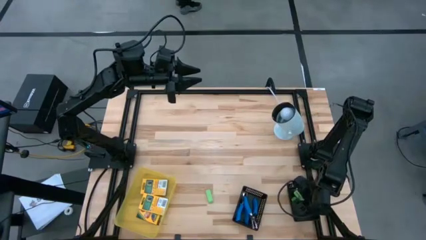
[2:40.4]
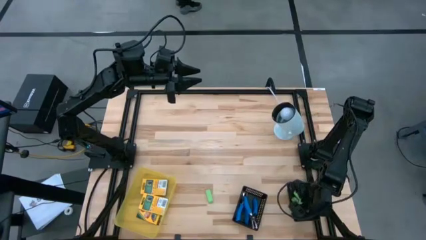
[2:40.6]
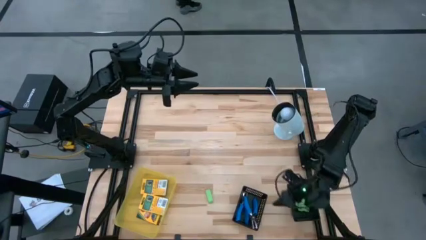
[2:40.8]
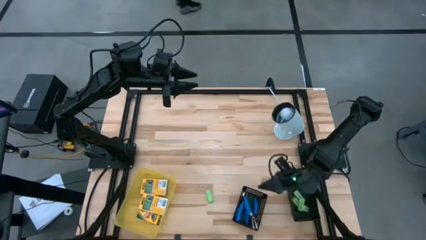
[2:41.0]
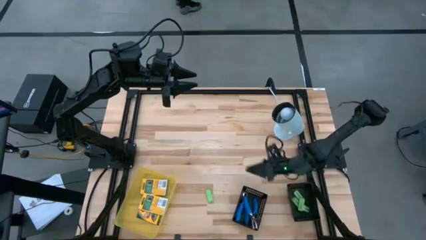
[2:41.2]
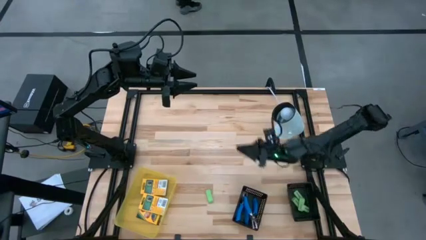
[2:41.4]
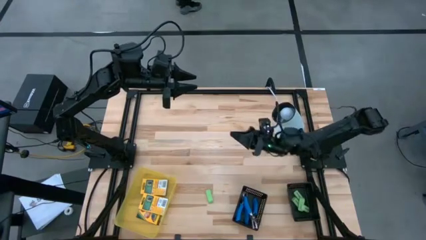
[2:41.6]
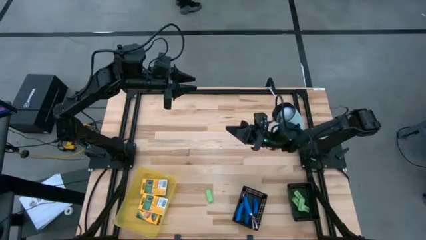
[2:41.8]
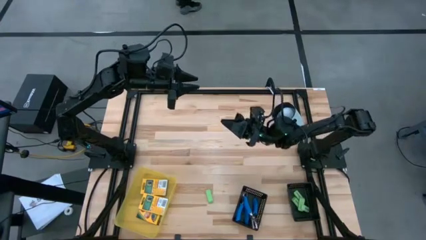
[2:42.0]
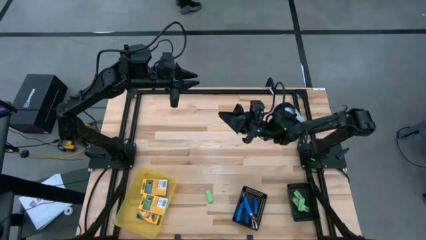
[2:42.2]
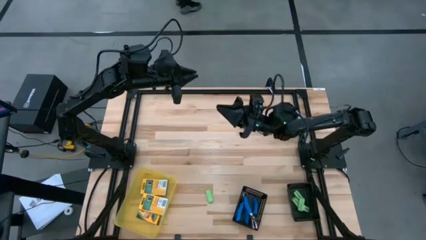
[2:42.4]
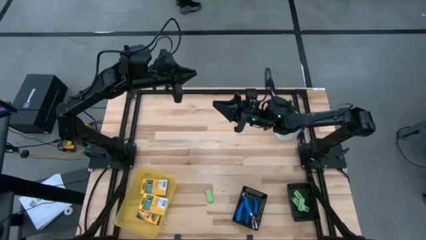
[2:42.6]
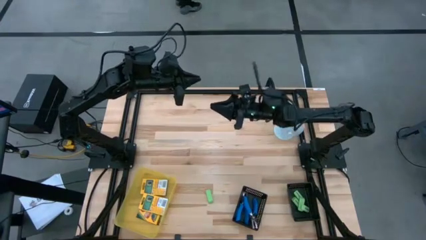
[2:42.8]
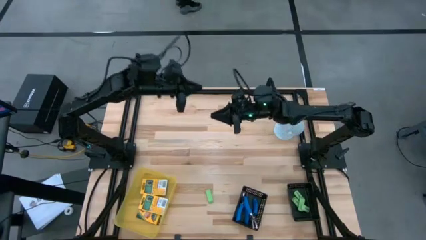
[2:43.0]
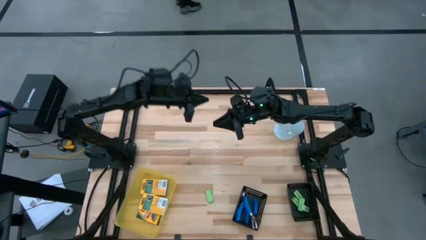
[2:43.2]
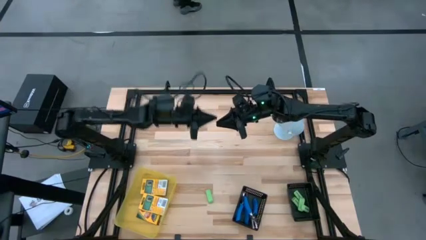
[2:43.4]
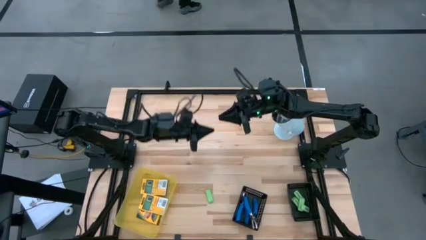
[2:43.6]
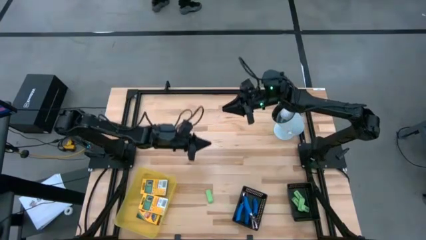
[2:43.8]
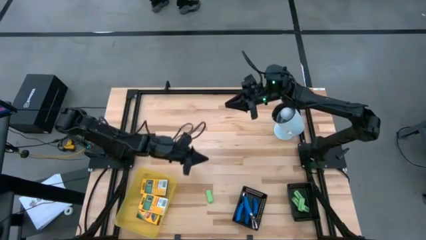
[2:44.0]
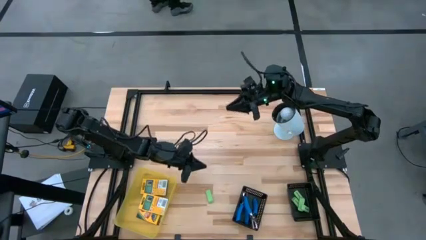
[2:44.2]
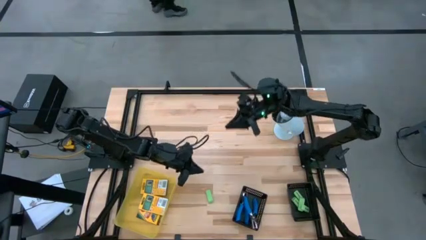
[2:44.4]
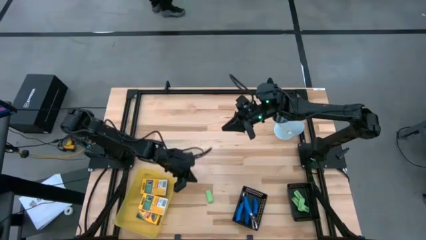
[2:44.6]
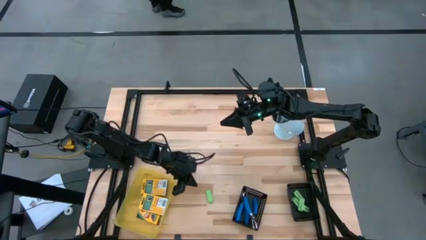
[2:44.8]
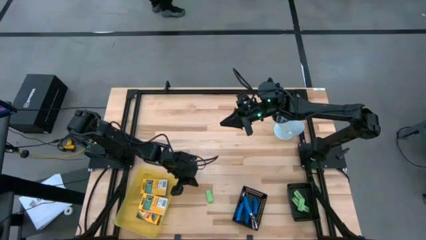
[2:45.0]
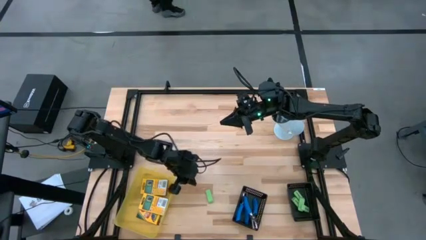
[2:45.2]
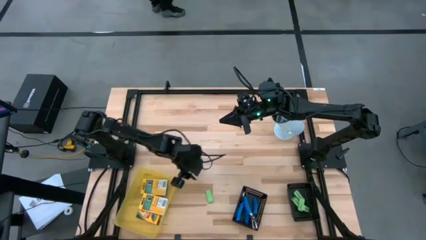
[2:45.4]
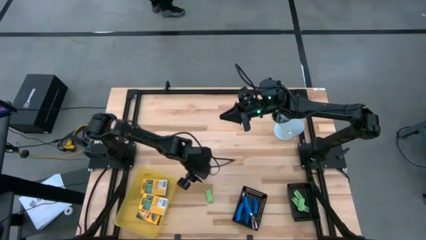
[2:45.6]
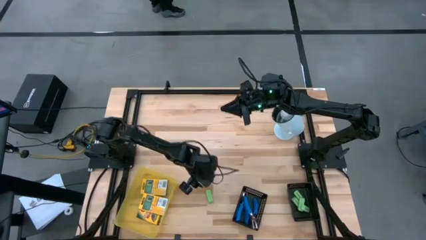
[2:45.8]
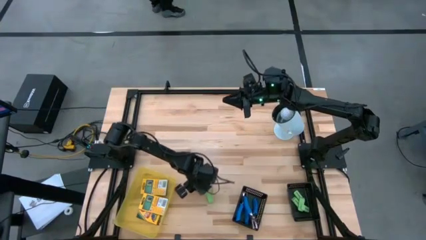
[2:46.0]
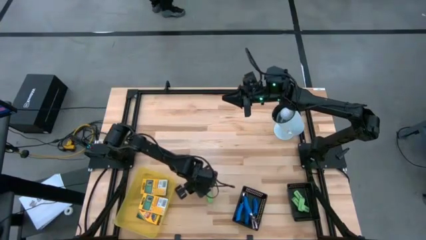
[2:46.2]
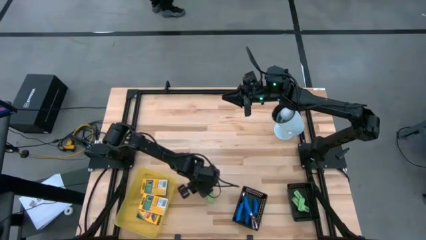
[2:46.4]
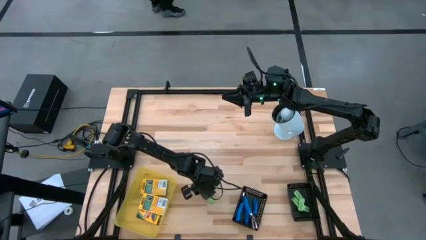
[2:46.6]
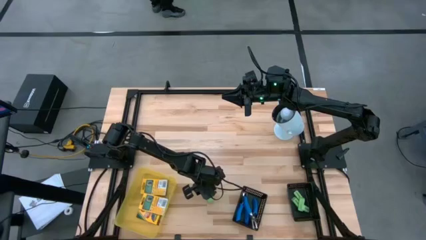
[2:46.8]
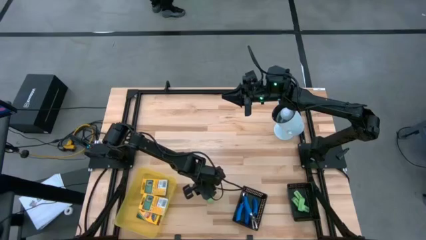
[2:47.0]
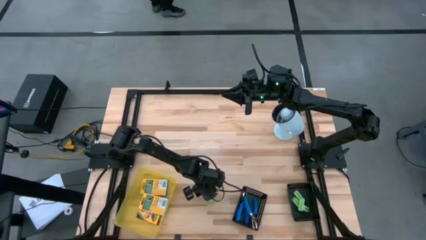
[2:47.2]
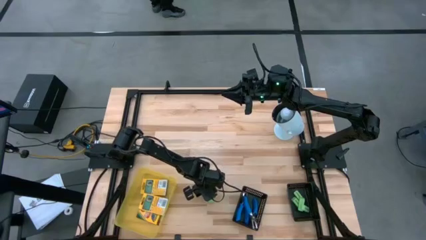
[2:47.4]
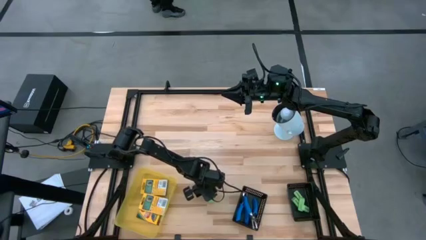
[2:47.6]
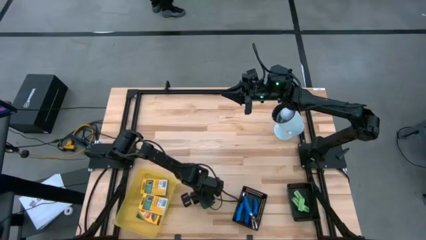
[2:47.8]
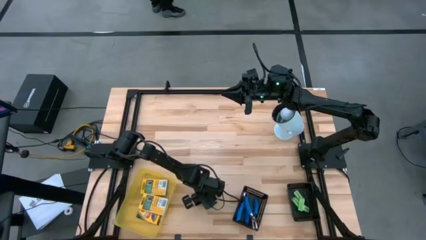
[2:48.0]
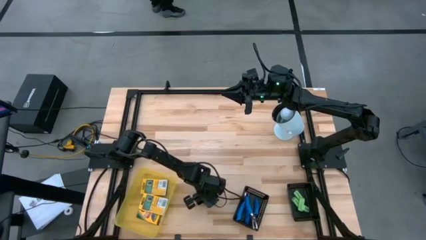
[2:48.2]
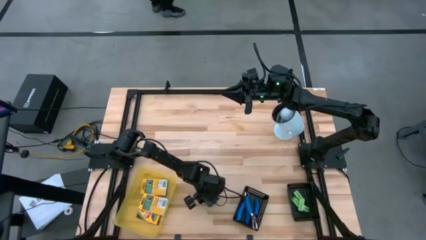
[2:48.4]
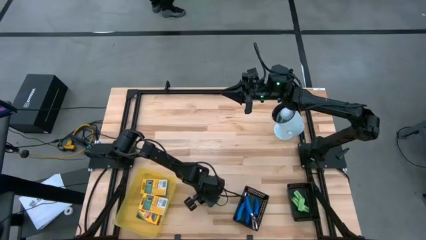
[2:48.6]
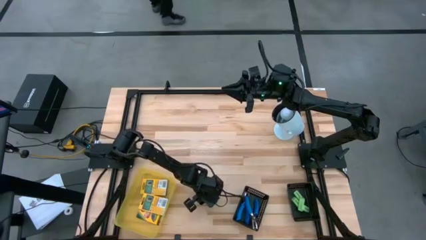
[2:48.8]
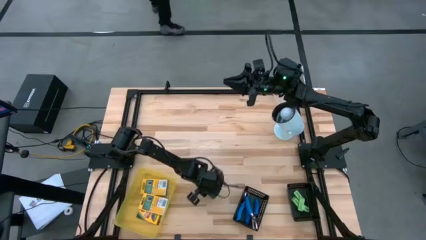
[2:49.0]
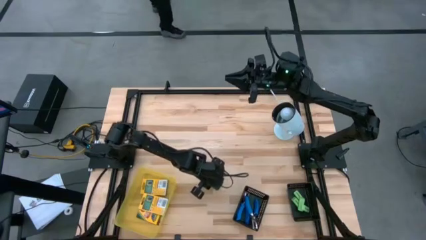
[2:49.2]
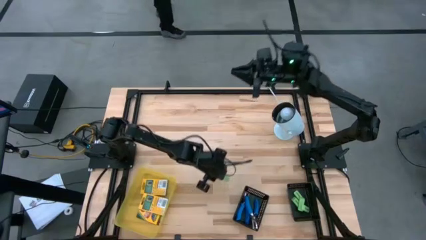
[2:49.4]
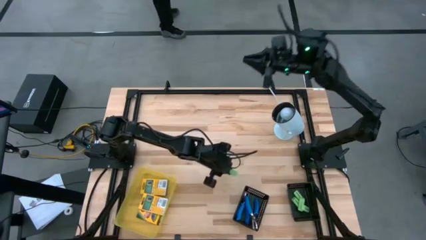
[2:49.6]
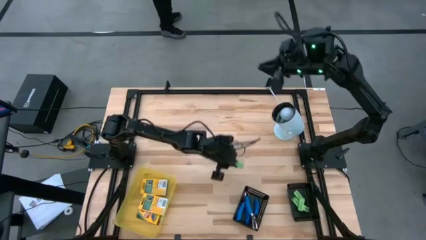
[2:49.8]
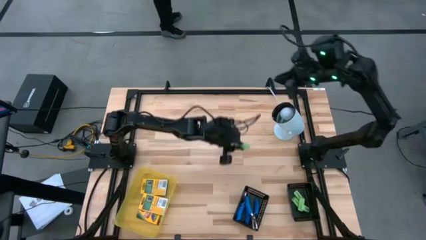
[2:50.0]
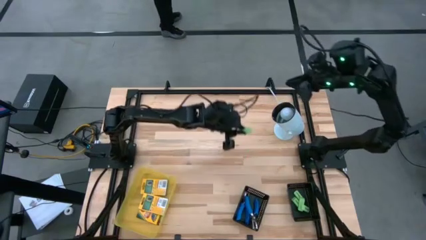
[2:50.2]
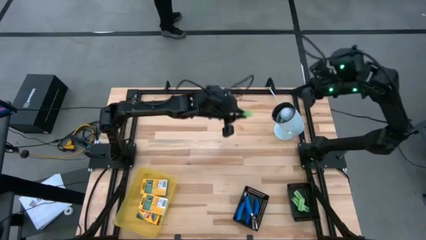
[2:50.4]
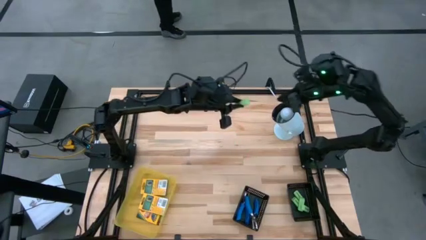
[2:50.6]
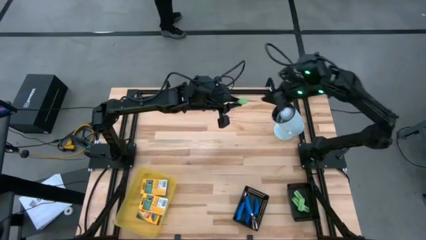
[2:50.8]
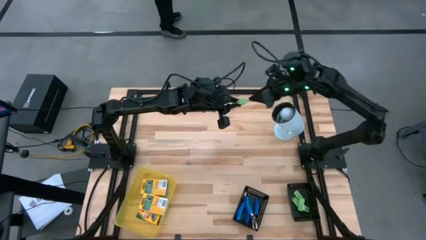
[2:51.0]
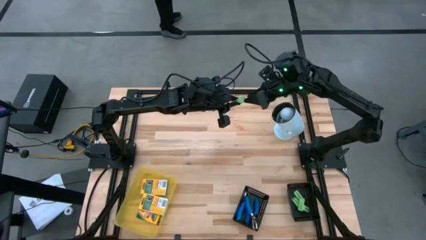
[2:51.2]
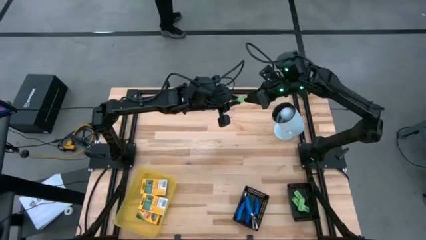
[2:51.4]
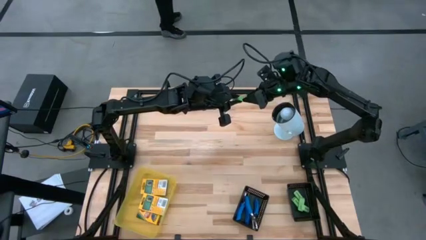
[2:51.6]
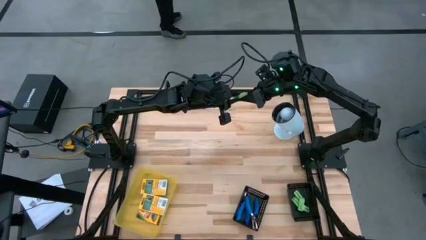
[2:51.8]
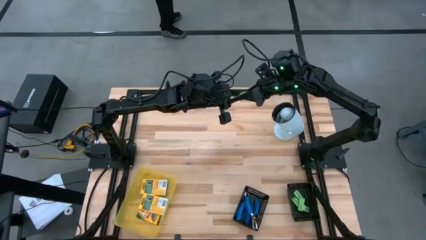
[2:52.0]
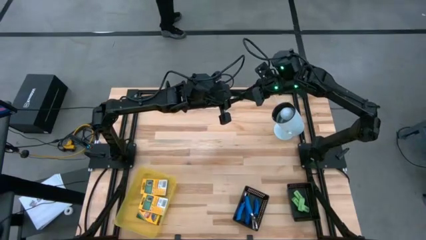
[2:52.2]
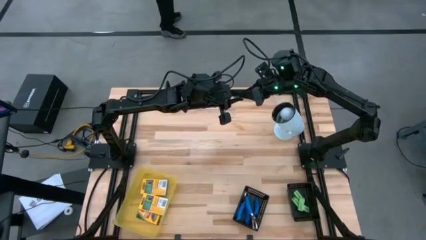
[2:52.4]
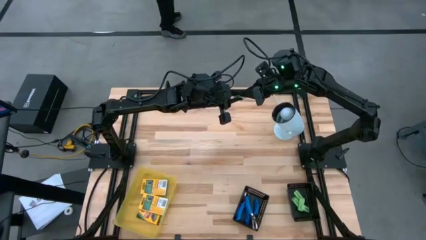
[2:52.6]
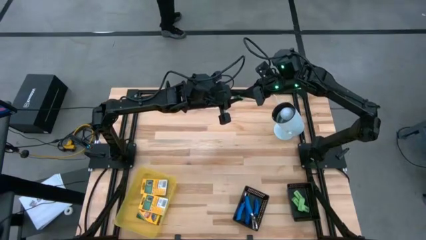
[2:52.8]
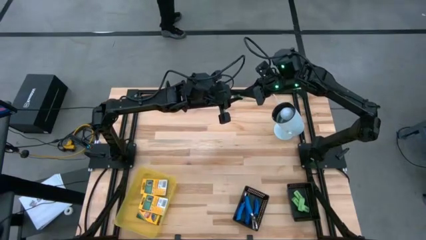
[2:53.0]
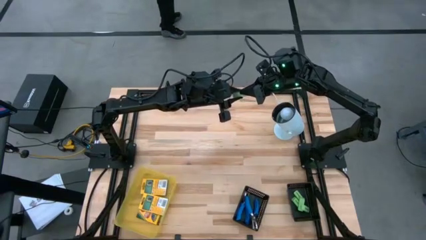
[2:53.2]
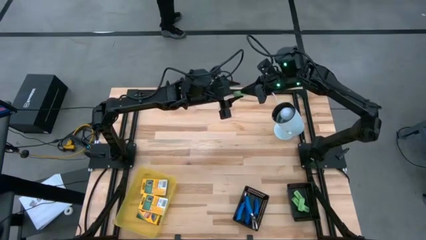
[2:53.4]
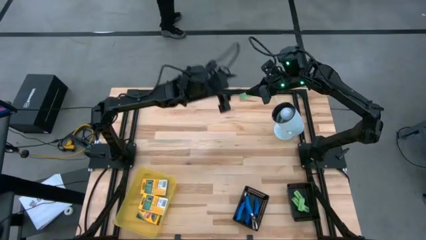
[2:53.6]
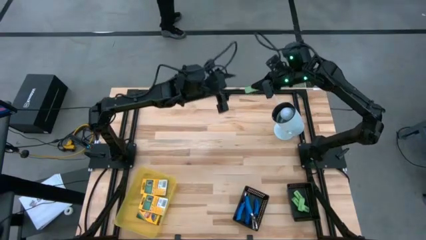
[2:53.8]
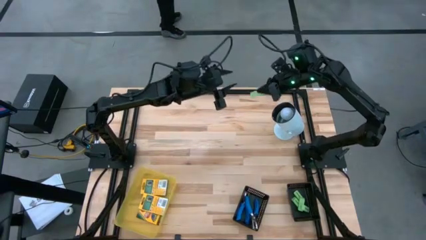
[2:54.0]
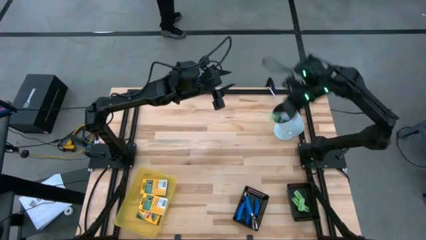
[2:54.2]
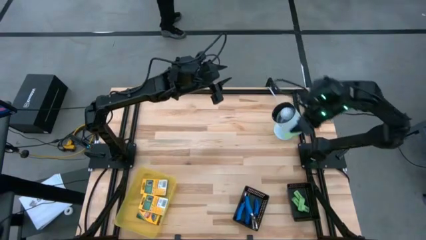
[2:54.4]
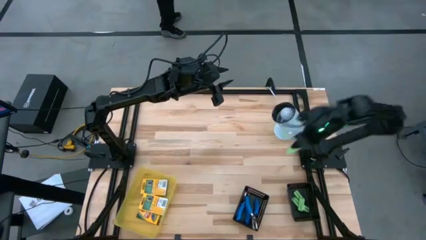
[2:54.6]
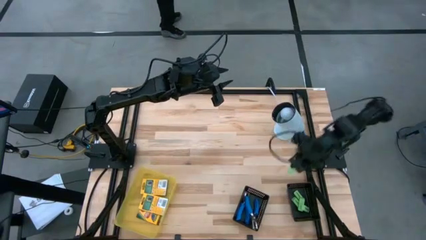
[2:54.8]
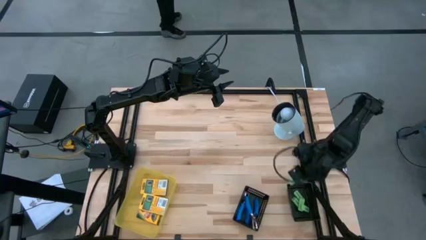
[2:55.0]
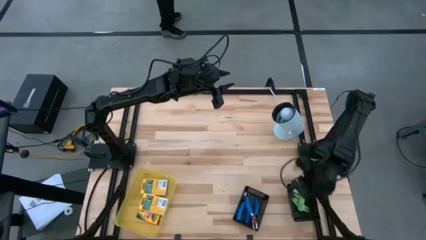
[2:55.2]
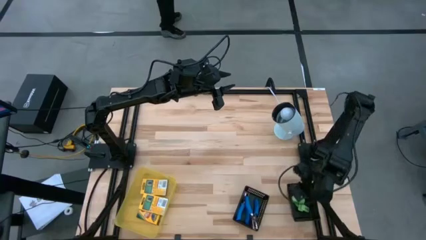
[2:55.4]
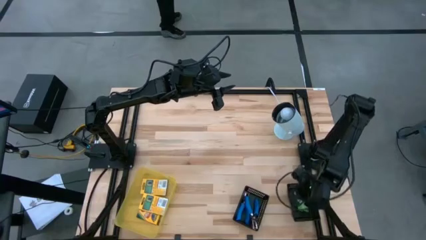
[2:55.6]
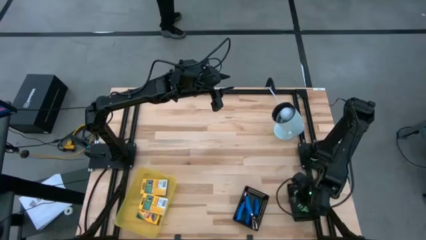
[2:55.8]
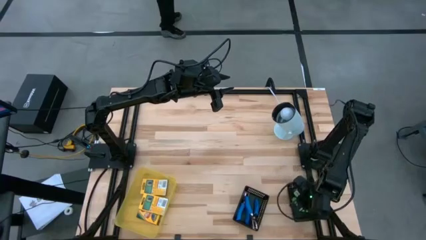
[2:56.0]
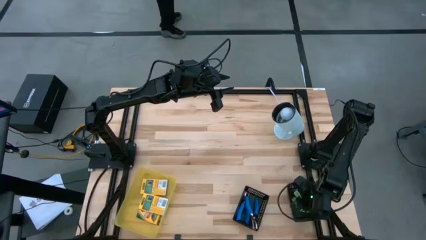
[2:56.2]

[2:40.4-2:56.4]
Task: Pick & Place School Supplies
Put the green eraser into the right black bin

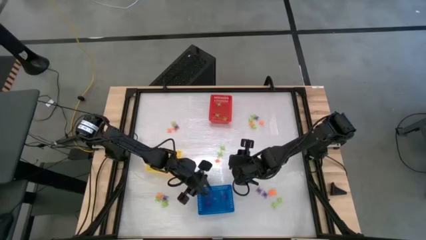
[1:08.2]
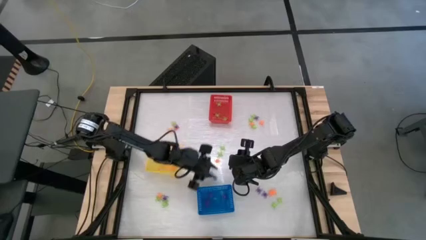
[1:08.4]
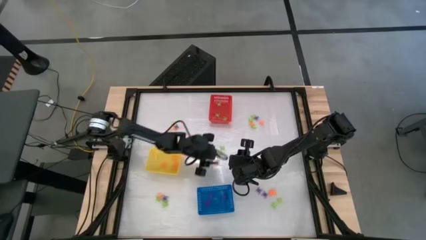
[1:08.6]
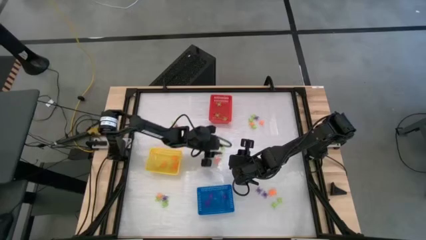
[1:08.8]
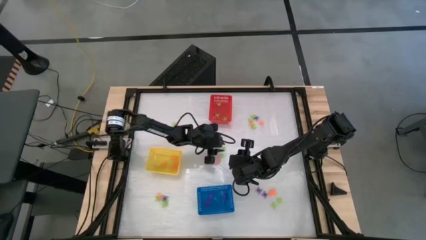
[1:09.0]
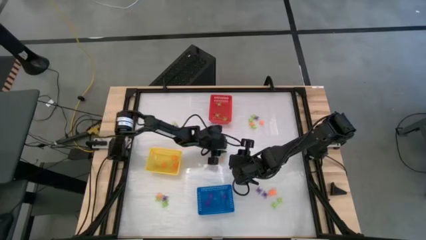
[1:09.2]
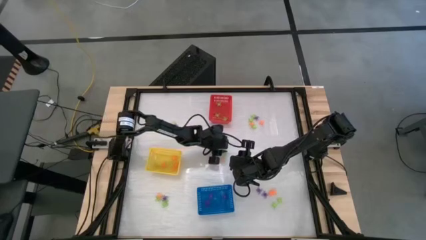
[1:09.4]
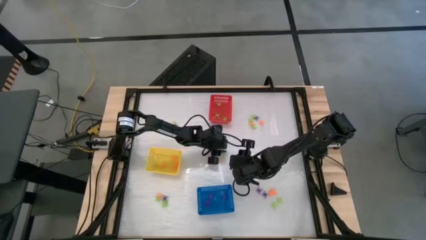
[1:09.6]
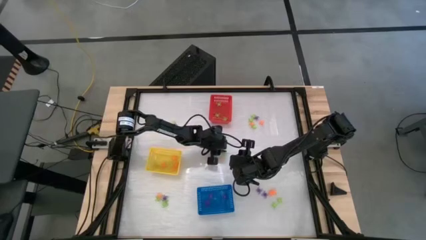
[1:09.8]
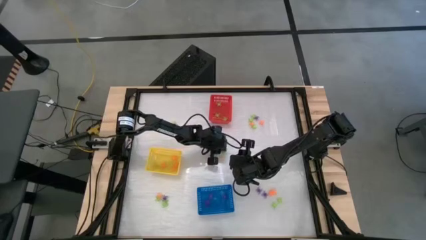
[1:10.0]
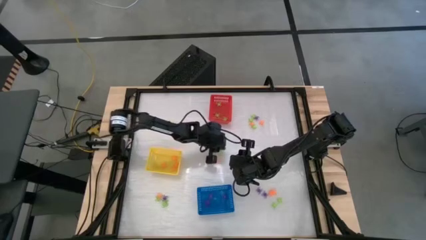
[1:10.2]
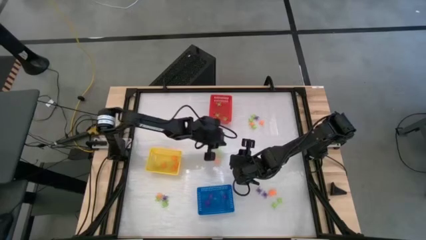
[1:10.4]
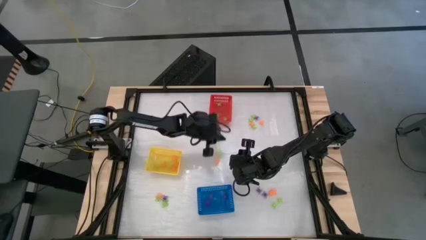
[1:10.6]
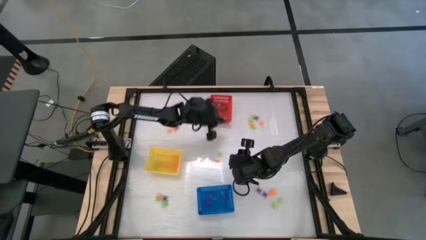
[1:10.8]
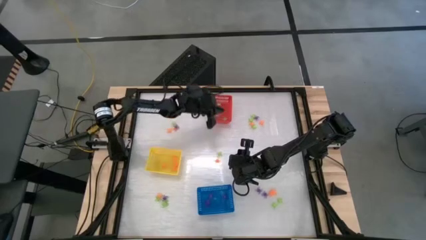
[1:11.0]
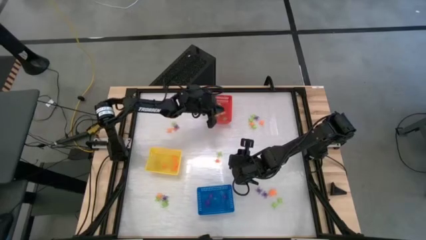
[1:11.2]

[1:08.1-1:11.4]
Task: Sort Halloween decoration
Put the green spider toy into the red basket
